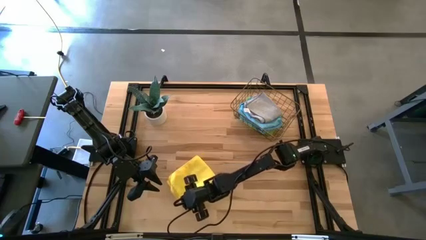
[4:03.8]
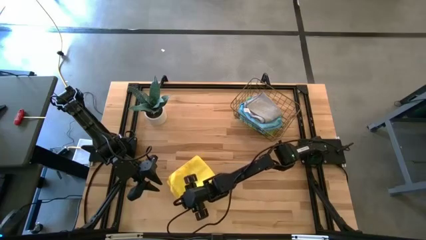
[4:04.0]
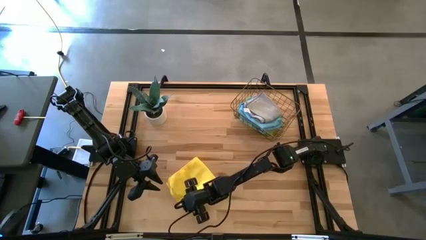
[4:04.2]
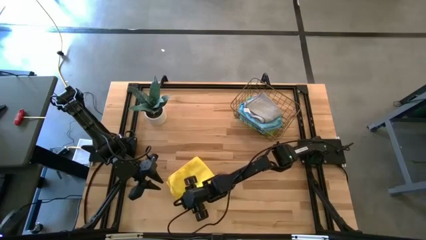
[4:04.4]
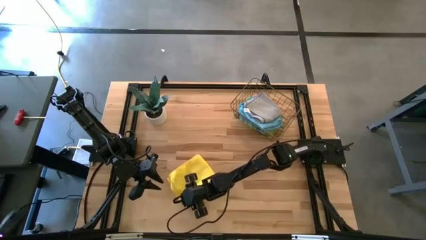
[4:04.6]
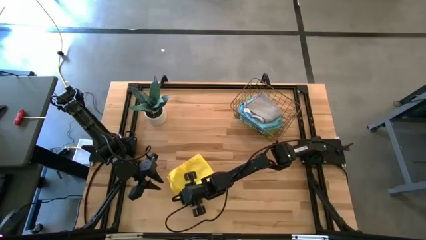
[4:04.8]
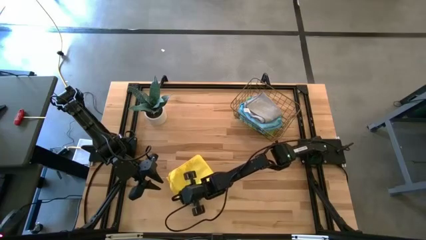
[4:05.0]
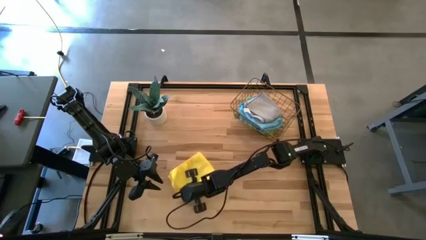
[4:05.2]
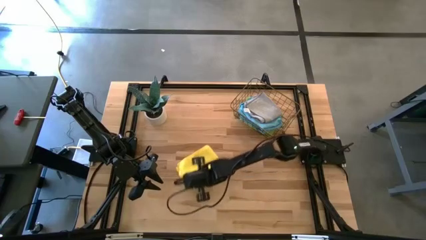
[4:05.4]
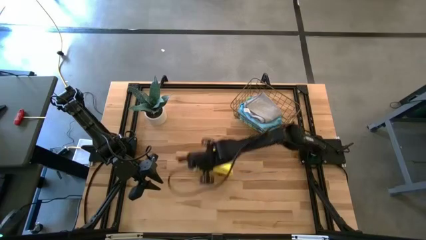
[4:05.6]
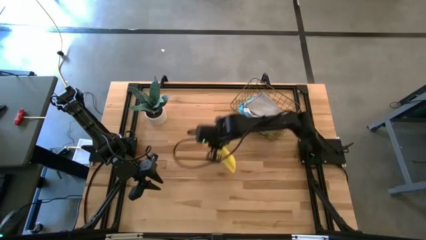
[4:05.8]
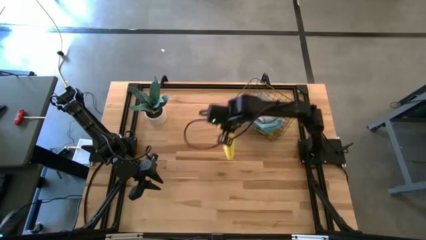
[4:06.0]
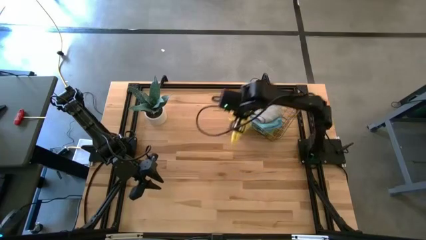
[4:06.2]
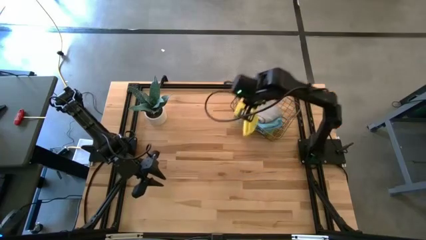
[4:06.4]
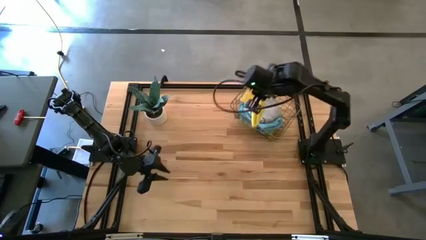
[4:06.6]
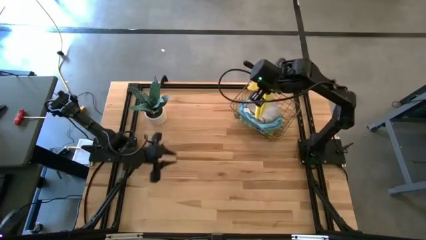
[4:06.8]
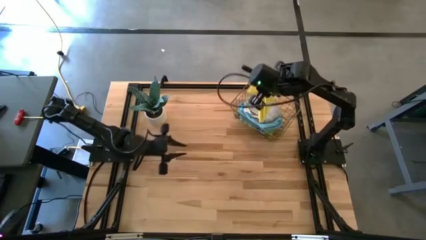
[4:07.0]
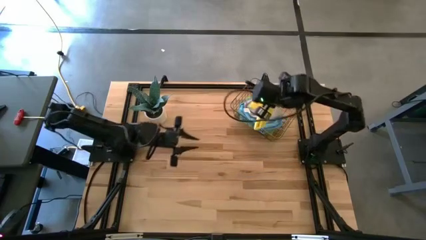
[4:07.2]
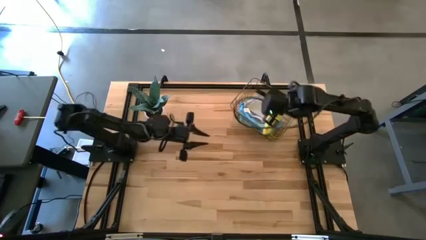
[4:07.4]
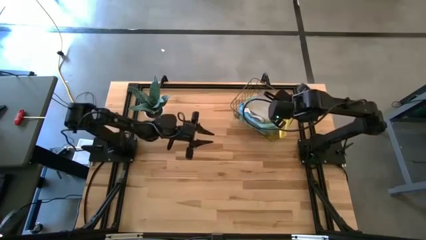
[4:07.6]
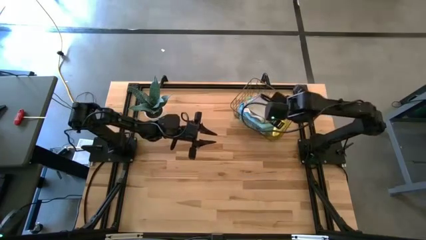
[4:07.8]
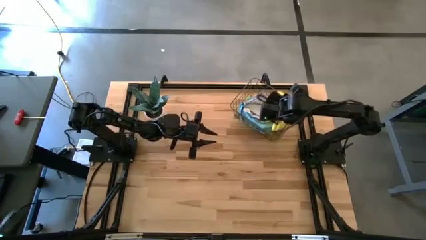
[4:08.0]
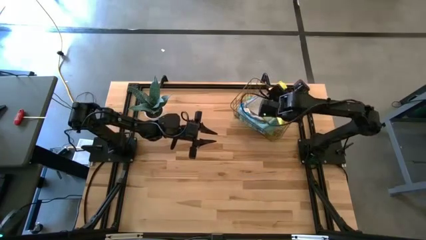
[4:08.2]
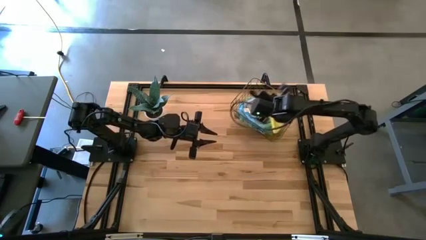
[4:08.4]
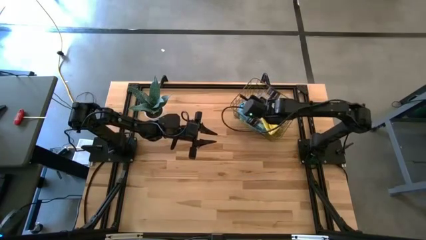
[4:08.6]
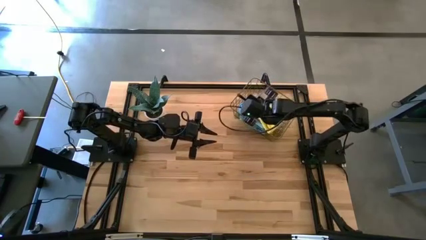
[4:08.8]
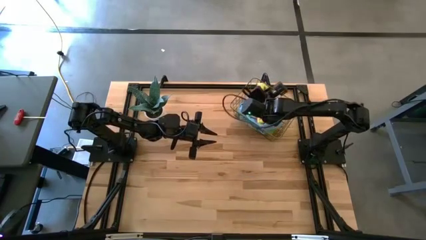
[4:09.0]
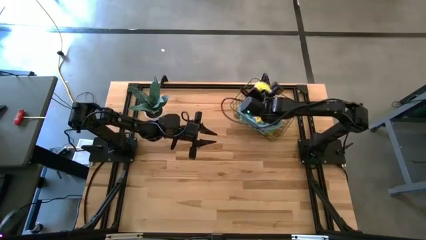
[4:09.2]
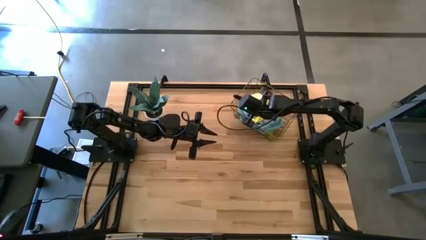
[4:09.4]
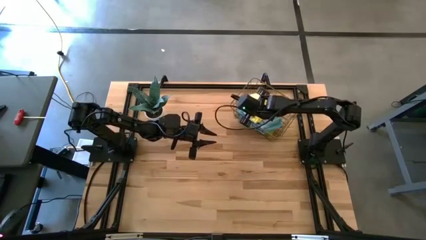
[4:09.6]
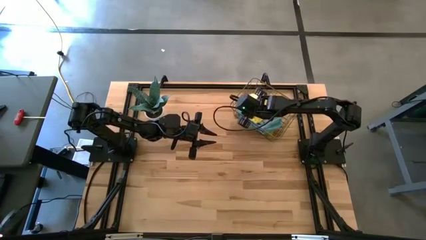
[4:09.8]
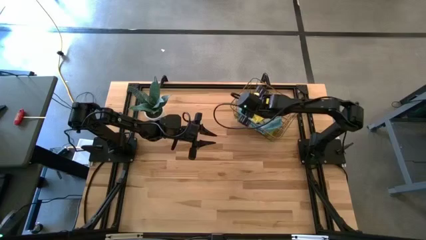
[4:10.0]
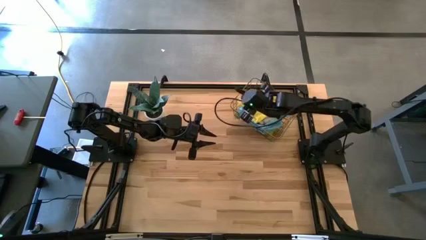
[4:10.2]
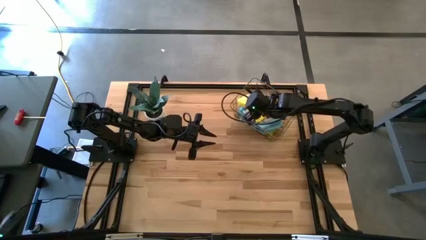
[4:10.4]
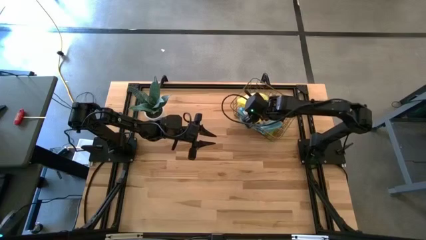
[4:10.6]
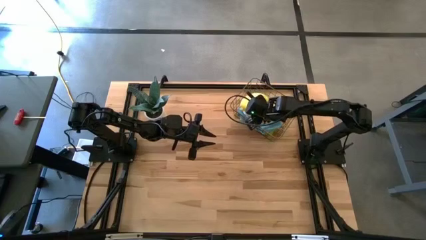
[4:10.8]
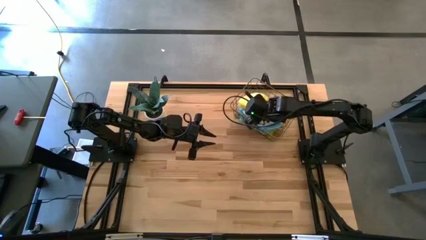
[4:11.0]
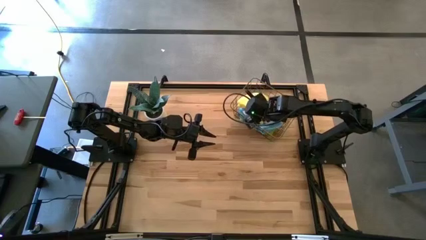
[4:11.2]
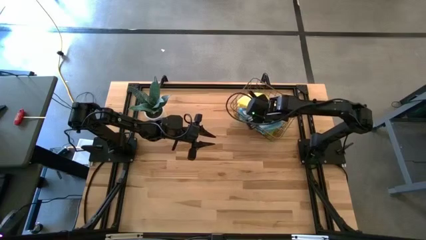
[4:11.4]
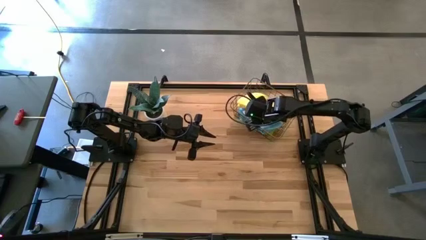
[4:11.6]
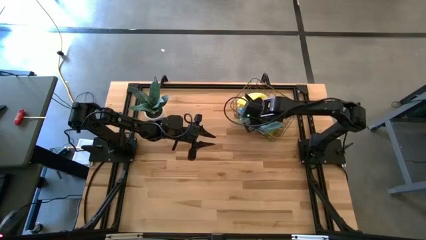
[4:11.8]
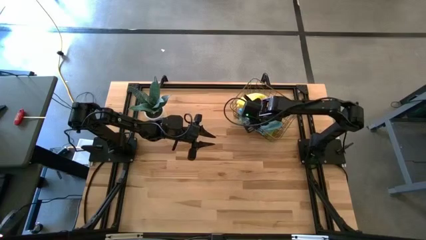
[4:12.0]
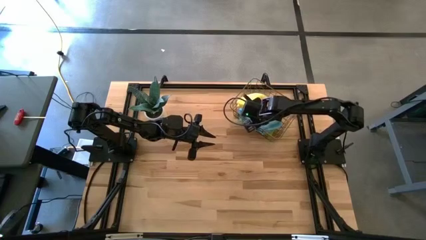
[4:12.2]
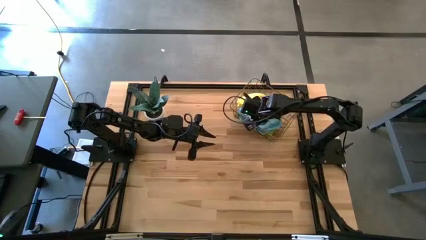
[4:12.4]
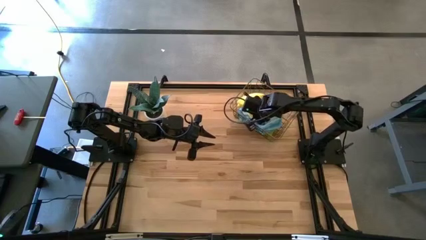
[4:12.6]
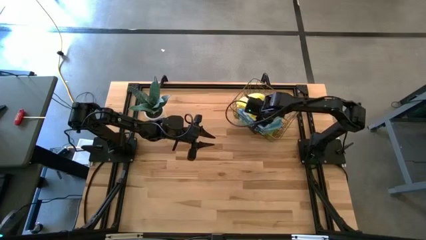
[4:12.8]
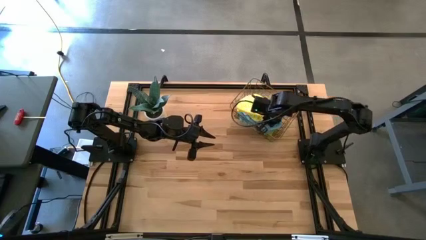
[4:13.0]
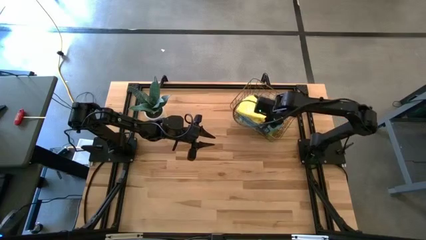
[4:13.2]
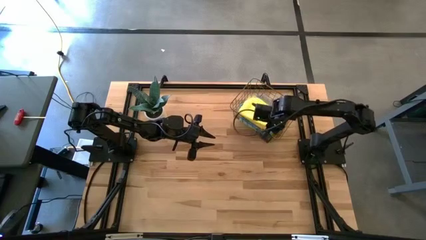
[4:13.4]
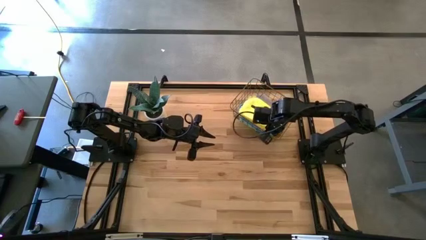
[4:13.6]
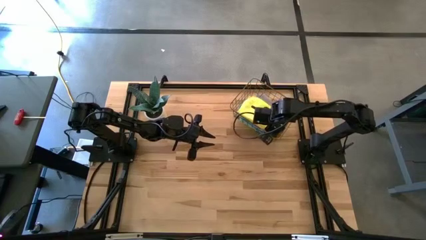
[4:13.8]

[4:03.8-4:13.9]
Task: Fold microfiber towels
Put the folded yellow microfiber towel into the wire basket
